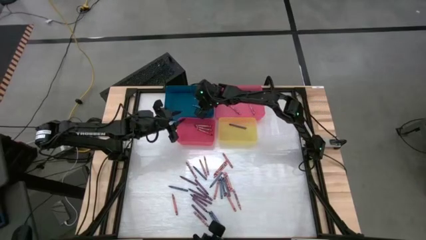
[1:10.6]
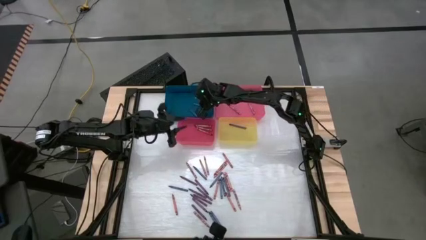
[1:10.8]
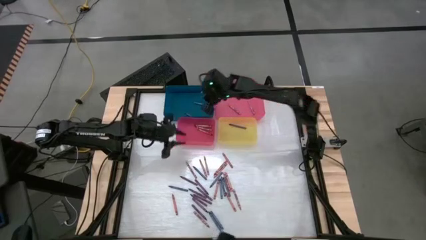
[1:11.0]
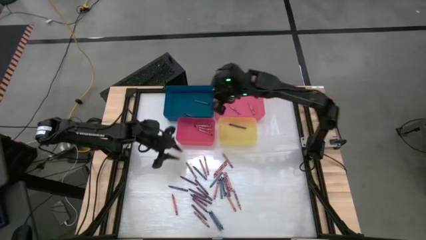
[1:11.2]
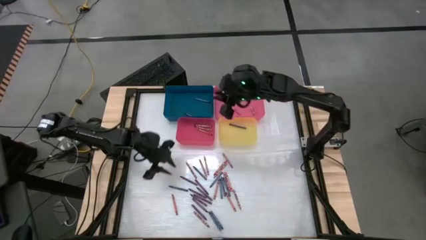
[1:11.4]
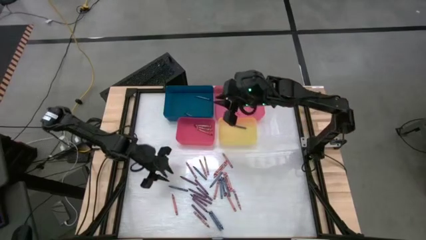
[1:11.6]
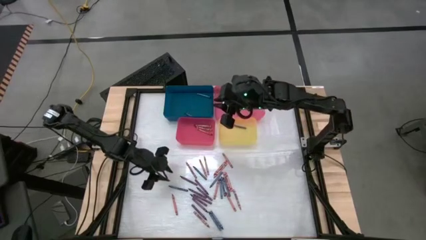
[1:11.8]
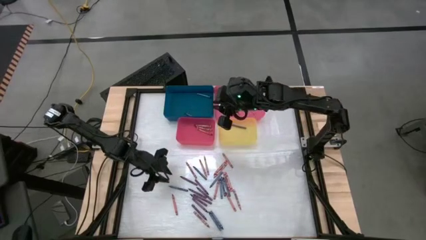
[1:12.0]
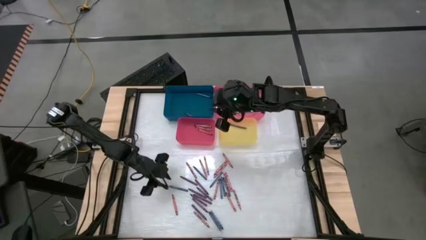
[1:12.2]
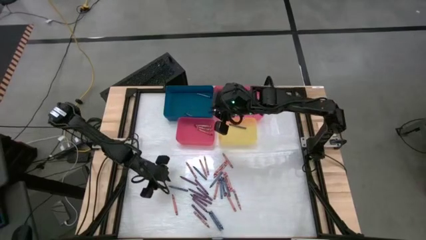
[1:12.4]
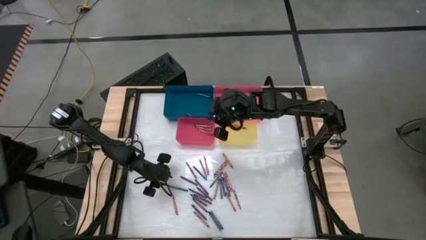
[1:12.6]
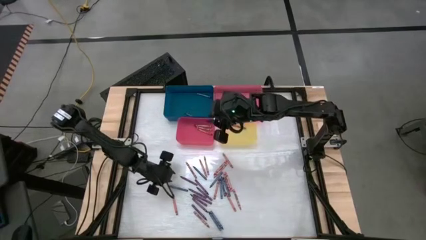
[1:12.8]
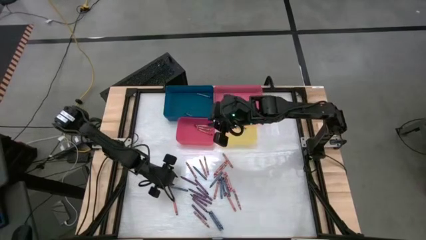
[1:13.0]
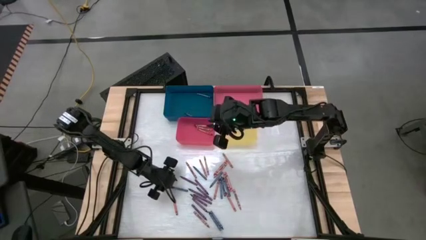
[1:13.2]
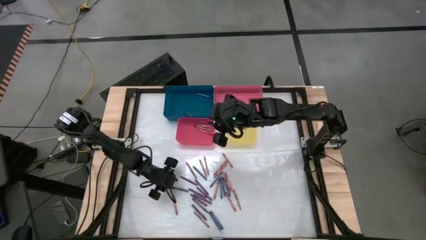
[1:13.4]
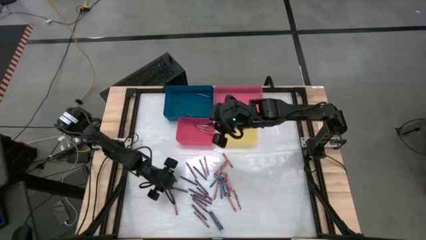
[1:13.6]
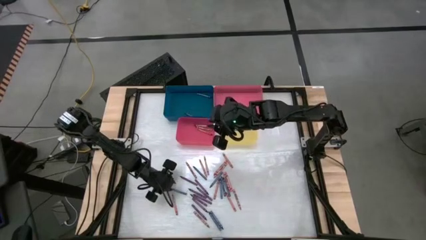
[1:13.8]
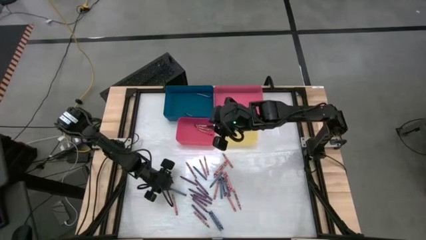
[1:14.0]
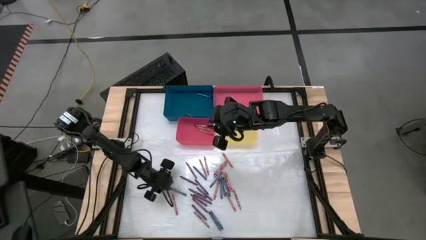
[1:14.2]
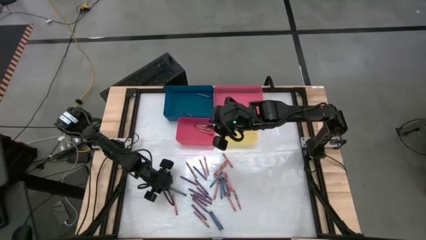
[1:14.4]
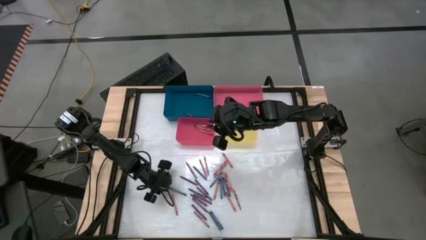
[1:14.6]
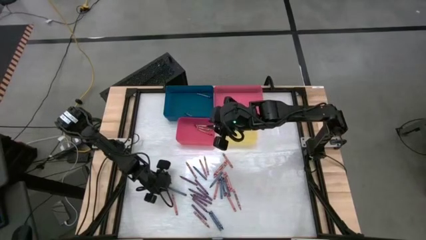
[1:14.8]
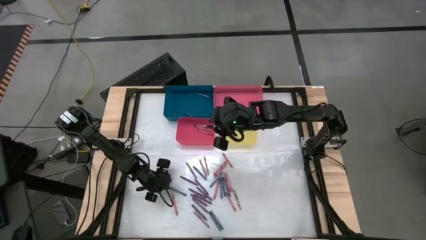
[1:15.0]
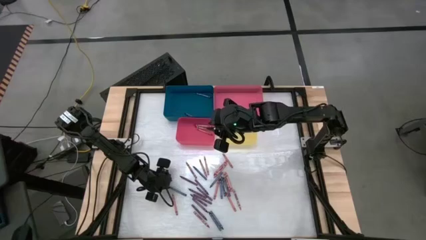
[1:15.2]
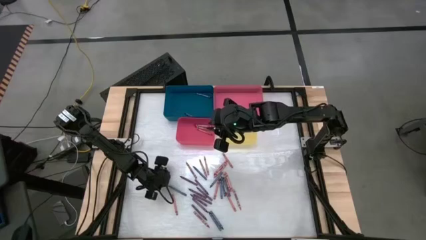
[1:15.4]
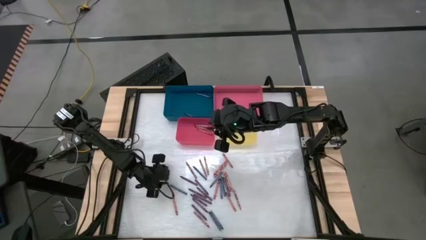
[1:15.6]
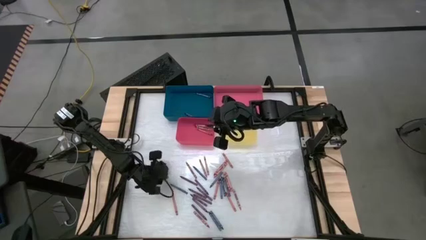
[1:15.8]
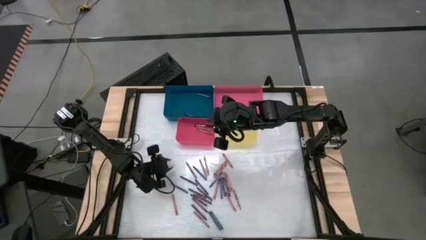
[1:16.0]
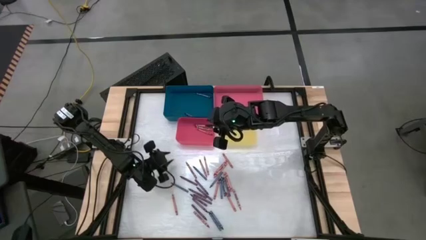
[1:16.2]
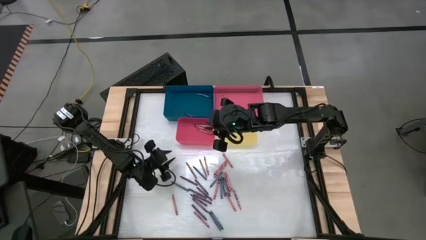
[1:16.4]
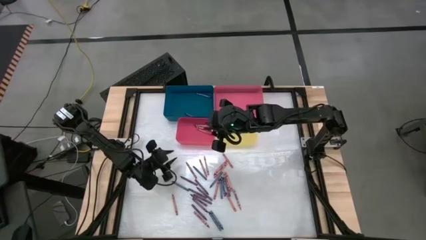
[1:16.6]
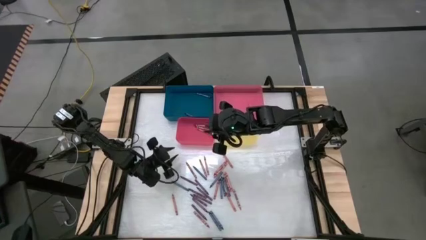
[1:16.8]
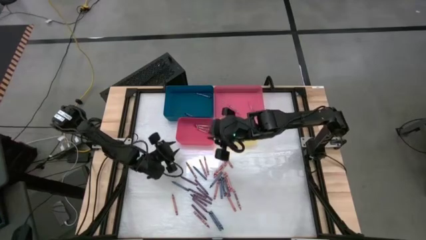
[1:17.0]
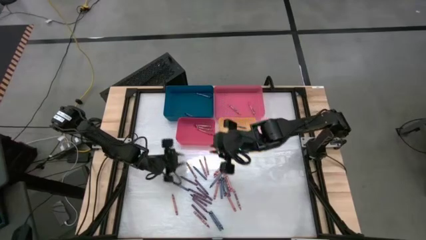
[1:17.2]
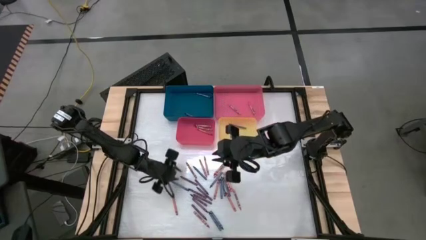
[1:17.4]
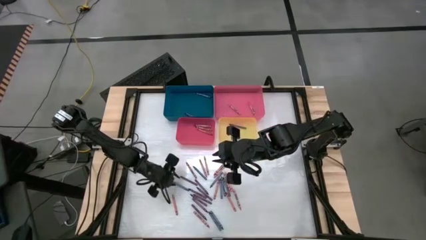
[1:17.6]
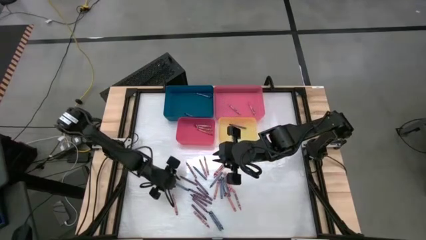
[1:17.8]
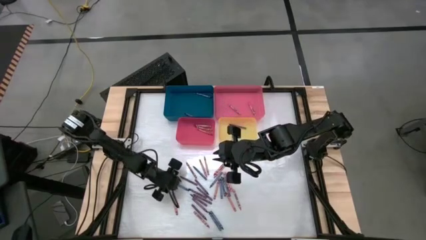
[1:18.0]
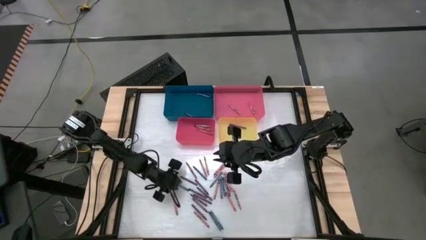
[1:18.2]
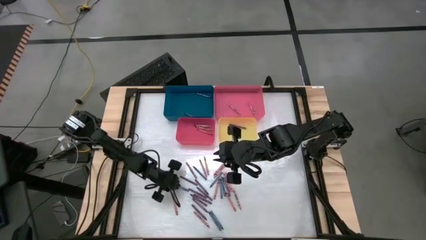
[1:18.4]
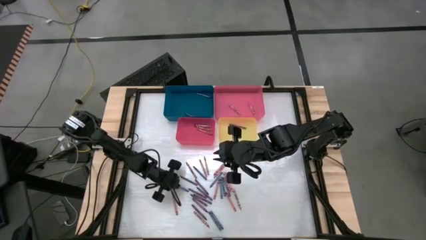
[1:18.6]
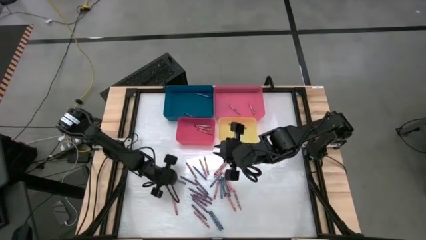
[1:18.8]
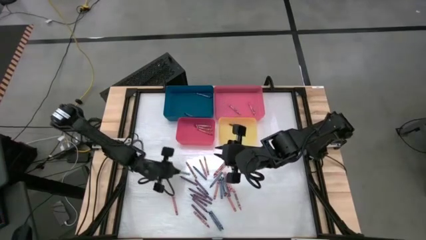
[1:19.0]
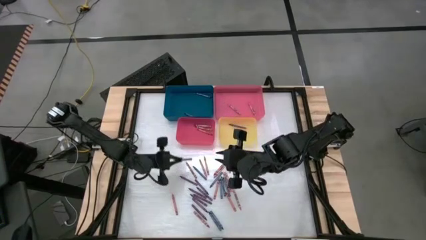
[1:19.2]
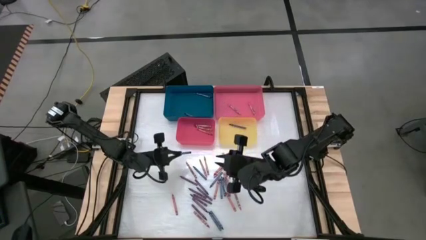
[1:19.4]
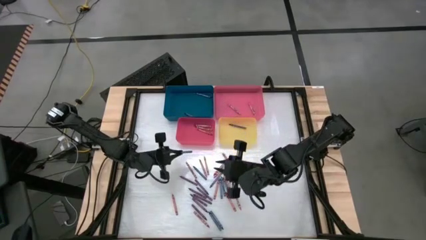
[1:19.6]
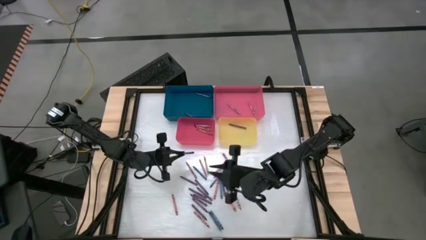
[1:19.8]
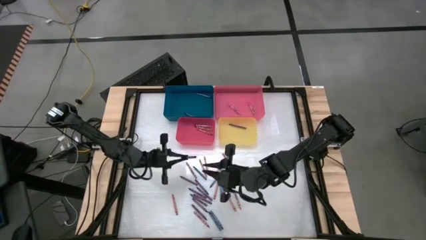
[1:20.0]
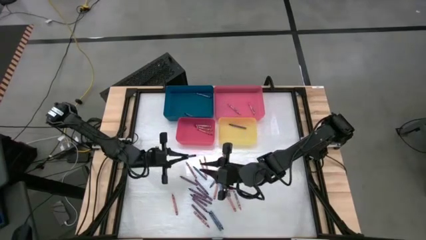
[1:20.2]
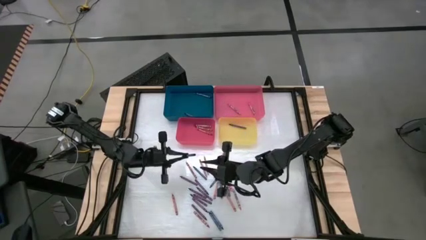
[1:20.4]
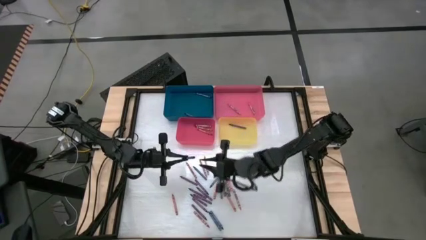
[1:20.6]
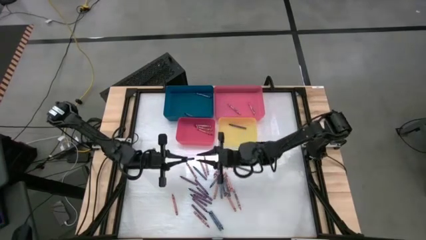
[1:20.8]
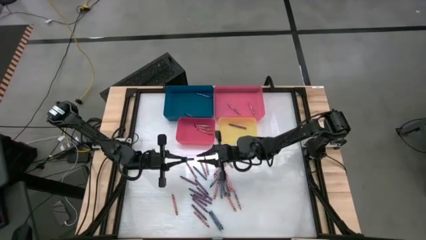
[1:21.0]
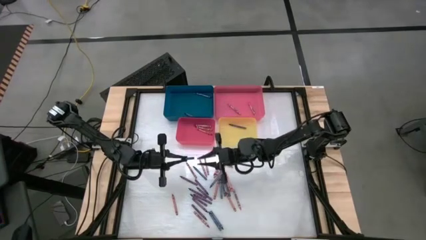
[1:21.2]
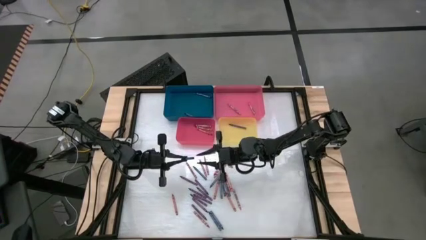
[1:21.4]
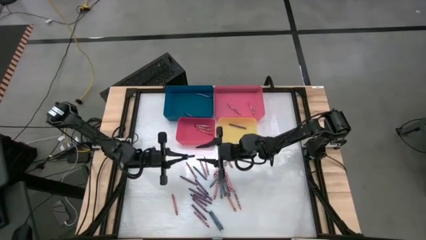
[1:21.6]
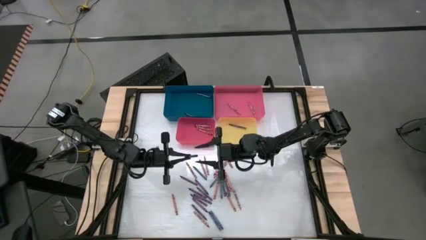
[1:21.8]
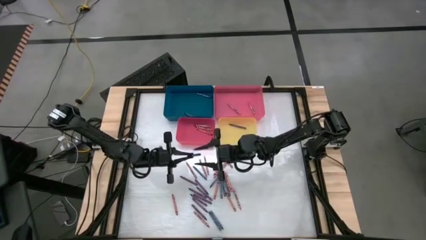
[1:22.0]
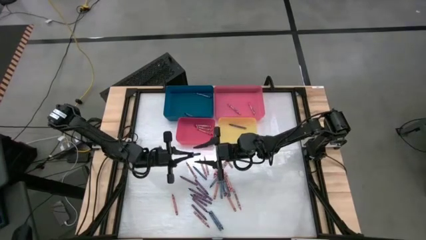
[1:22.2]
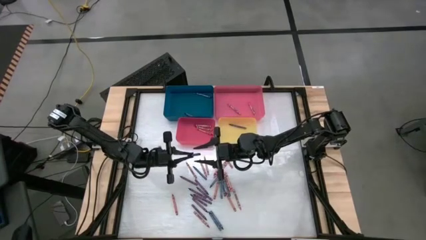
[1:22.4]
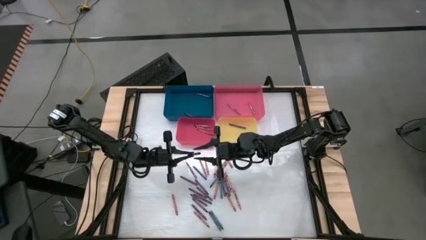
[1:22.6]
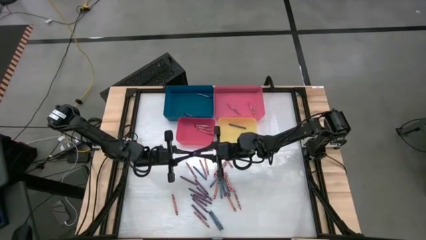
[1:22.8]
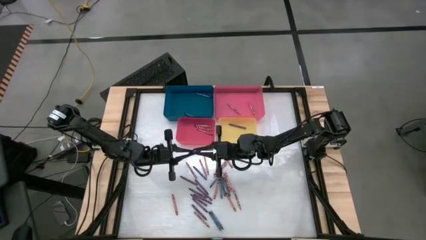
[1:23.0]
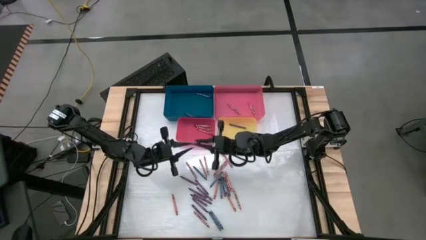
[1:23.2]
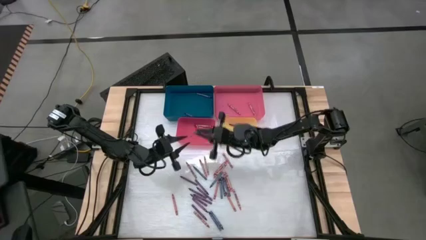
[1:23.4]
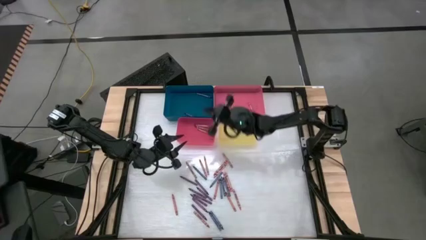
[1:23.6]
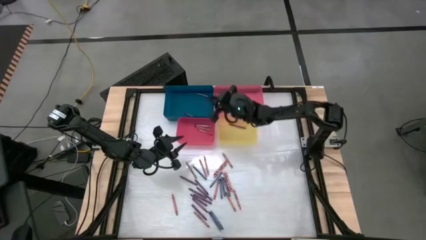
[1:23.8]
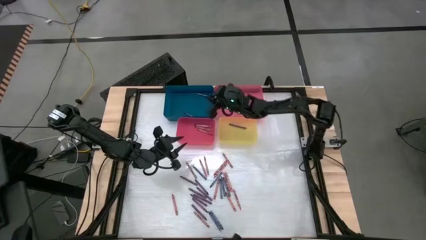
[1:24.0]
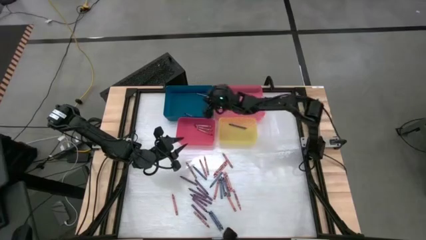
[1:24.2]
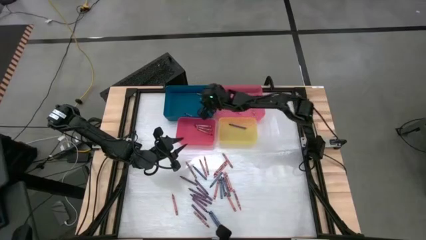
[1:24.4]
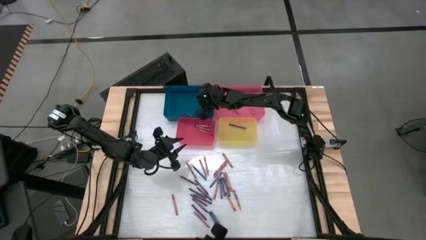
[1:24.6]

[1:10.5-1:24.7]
Task: Sort crayons
Put the blue crayon into the blue bin
